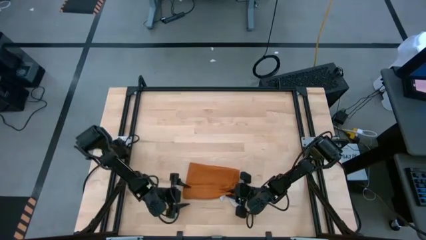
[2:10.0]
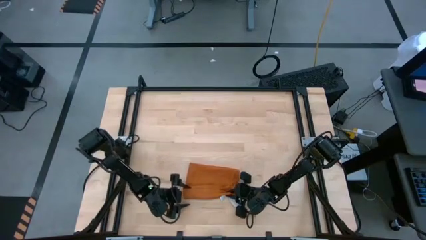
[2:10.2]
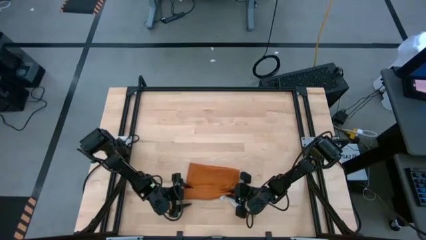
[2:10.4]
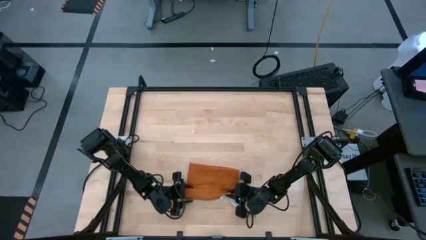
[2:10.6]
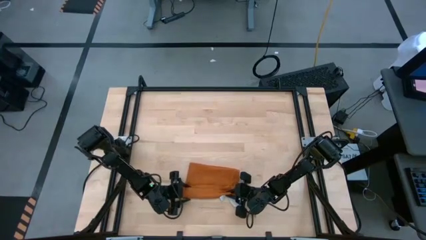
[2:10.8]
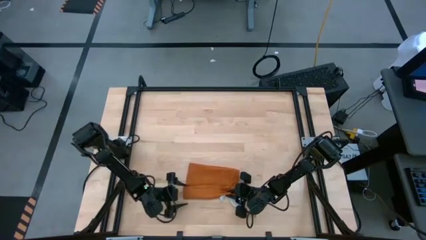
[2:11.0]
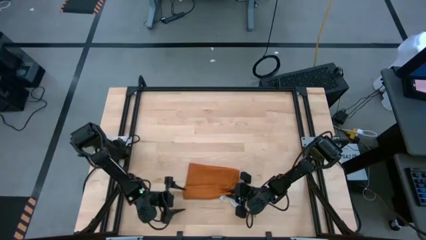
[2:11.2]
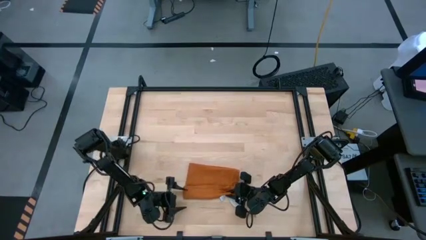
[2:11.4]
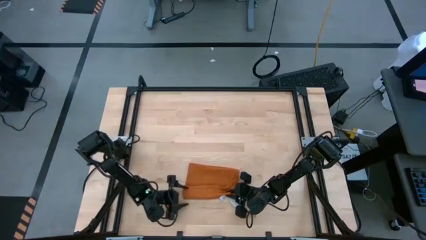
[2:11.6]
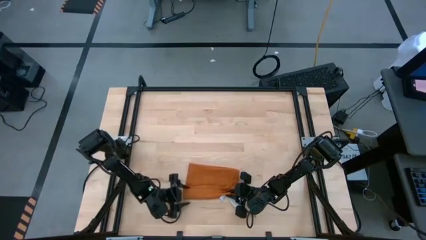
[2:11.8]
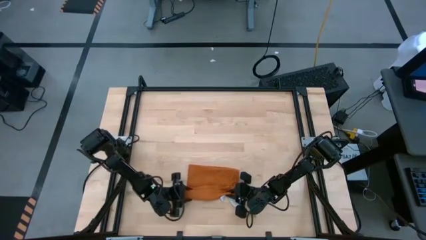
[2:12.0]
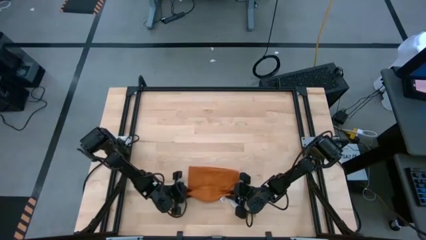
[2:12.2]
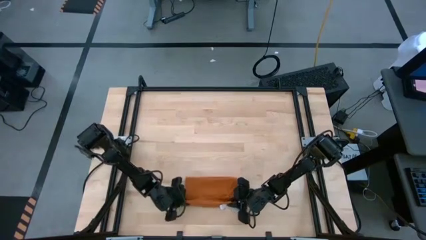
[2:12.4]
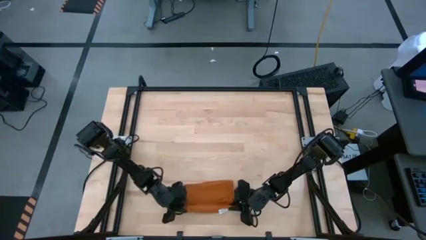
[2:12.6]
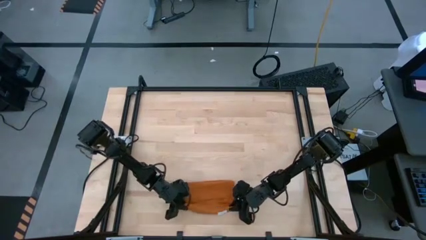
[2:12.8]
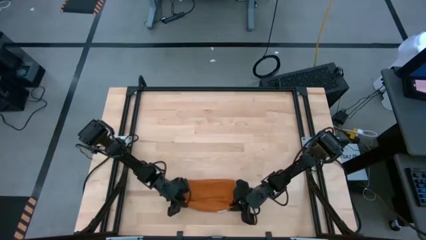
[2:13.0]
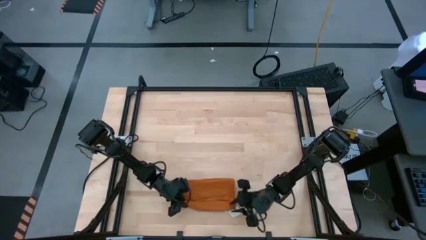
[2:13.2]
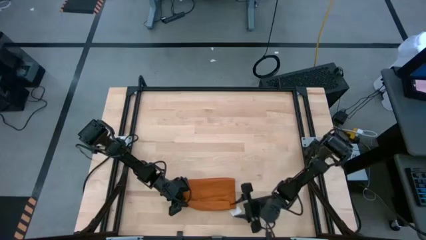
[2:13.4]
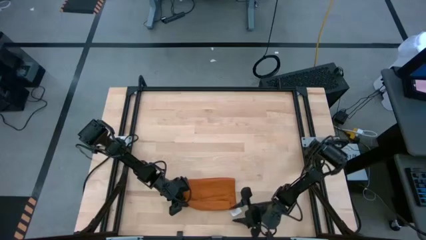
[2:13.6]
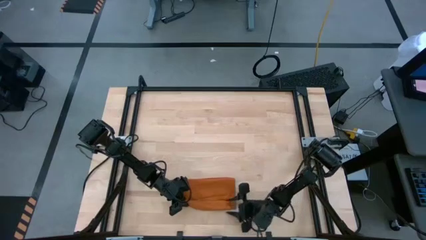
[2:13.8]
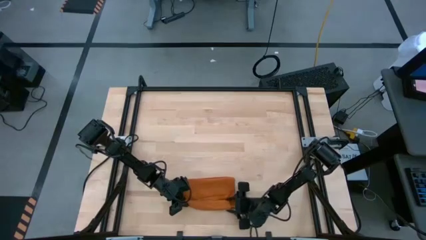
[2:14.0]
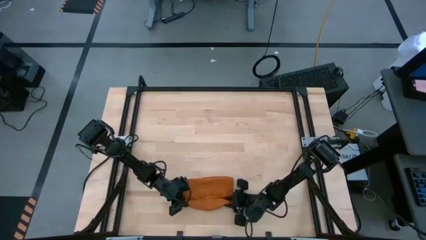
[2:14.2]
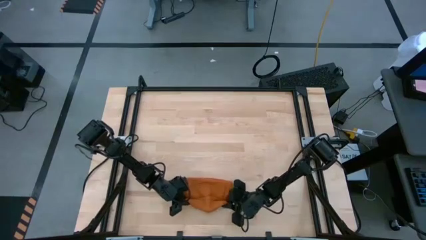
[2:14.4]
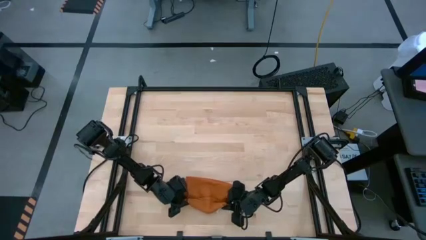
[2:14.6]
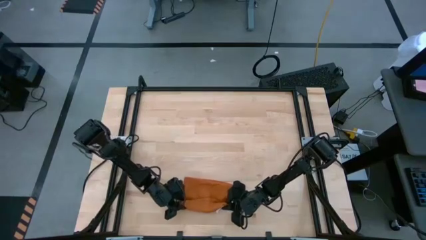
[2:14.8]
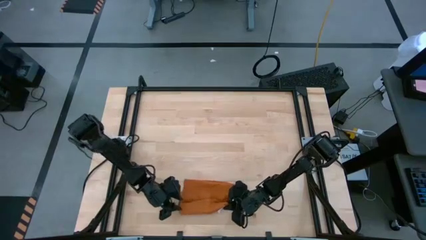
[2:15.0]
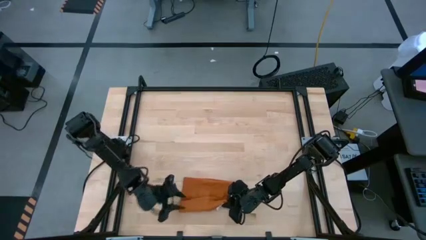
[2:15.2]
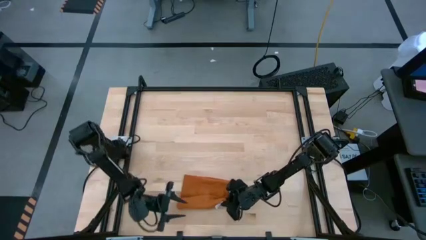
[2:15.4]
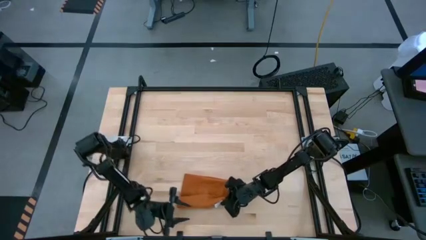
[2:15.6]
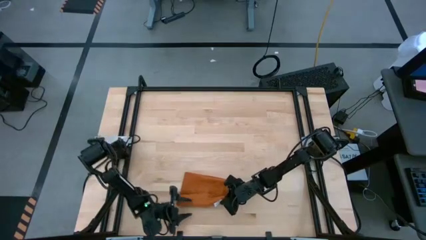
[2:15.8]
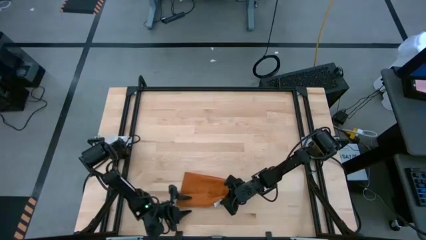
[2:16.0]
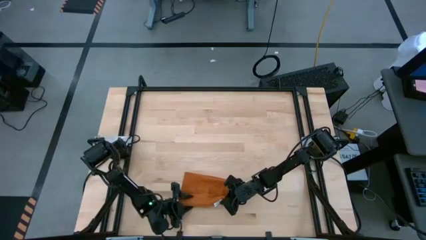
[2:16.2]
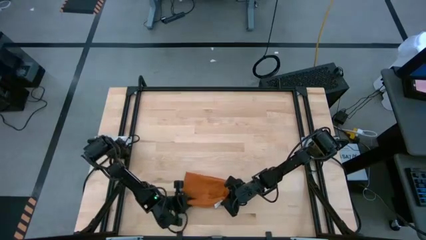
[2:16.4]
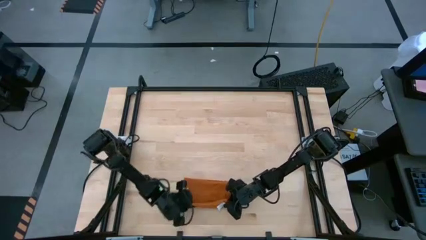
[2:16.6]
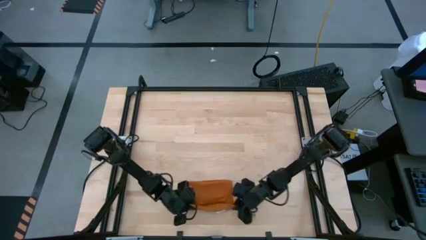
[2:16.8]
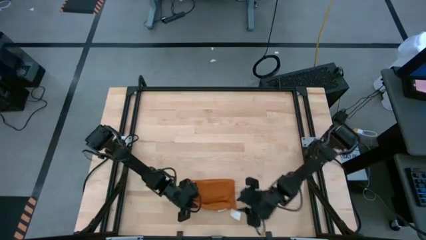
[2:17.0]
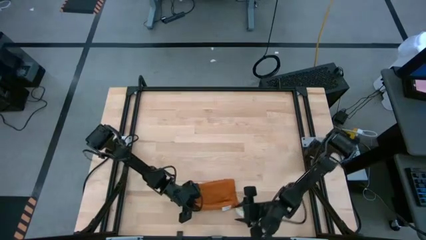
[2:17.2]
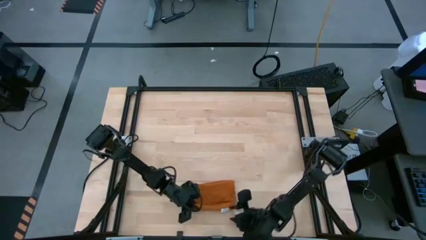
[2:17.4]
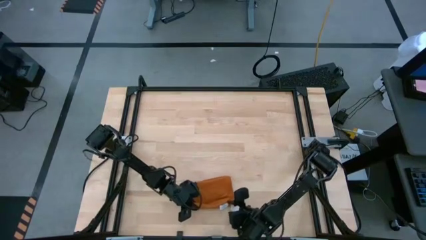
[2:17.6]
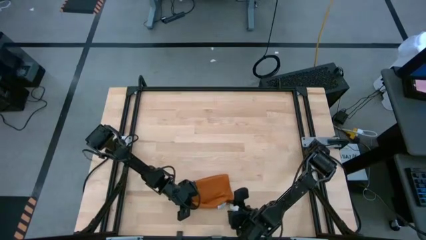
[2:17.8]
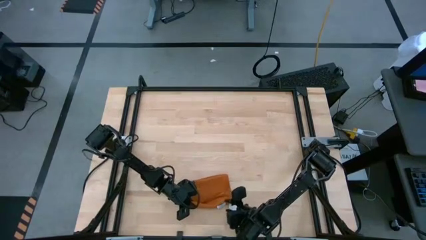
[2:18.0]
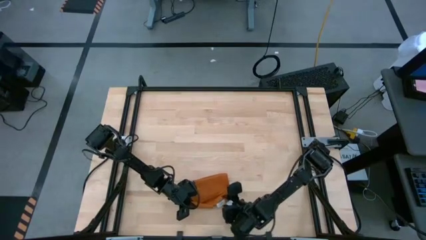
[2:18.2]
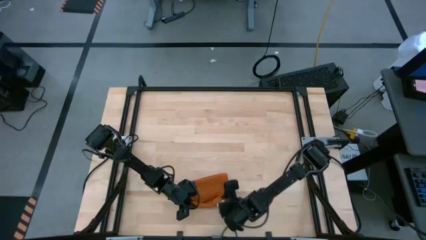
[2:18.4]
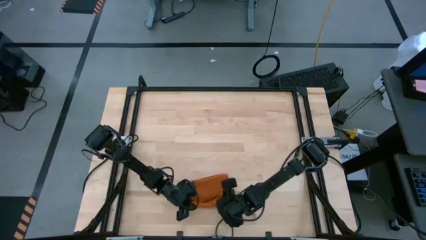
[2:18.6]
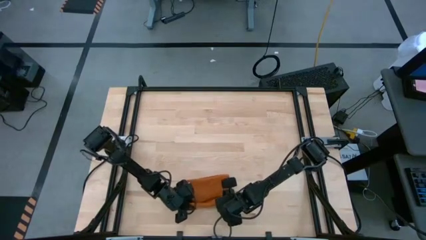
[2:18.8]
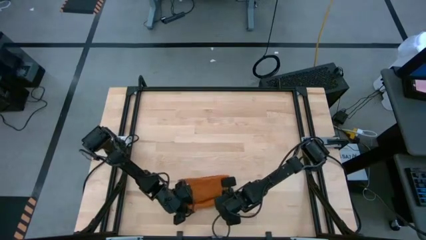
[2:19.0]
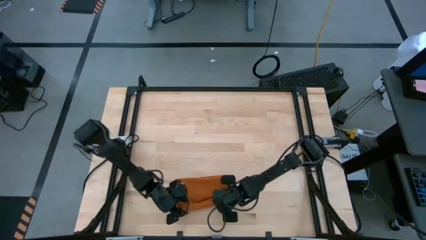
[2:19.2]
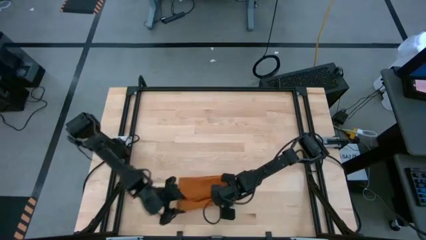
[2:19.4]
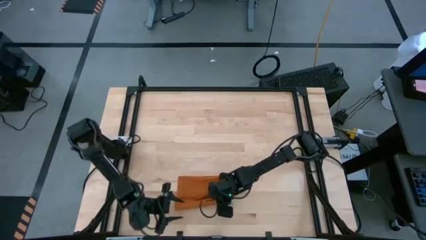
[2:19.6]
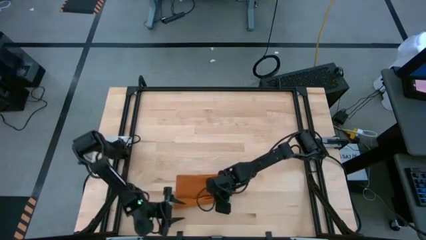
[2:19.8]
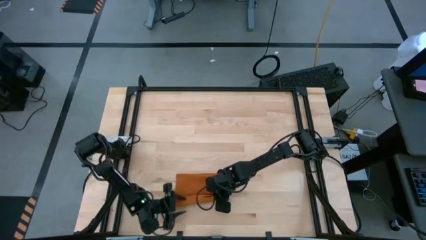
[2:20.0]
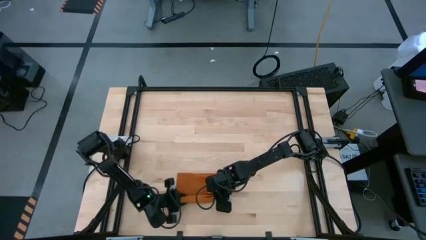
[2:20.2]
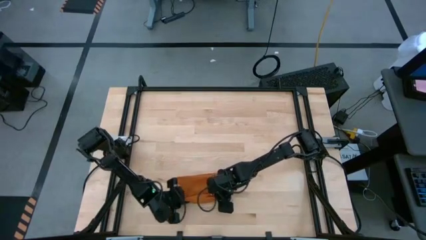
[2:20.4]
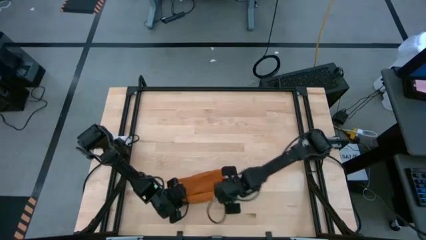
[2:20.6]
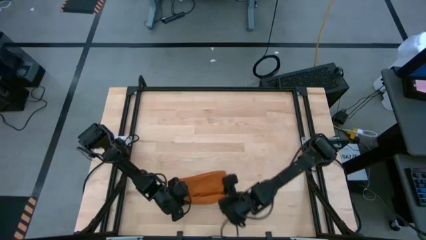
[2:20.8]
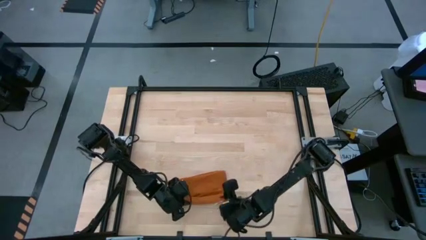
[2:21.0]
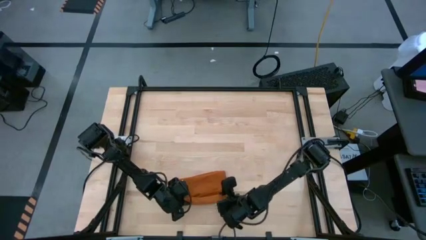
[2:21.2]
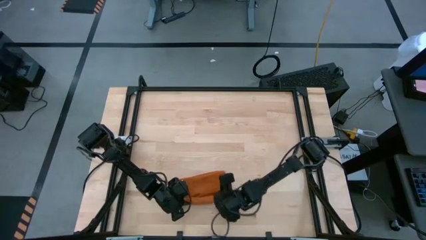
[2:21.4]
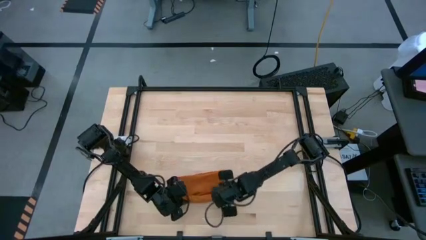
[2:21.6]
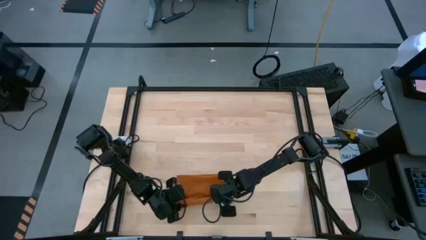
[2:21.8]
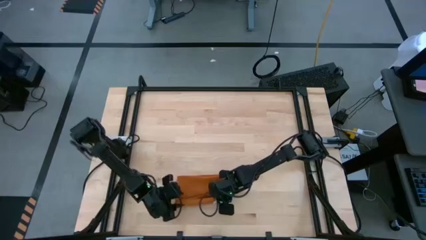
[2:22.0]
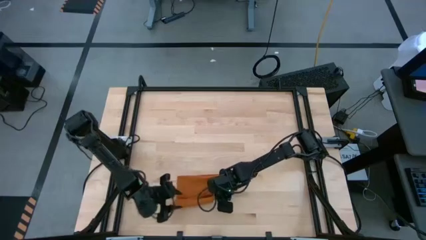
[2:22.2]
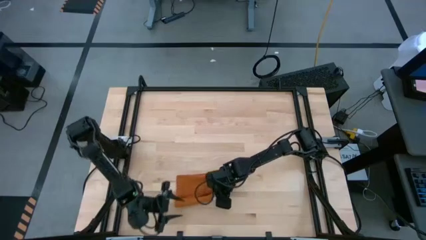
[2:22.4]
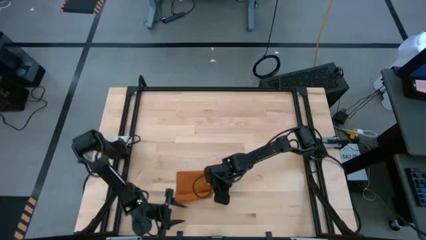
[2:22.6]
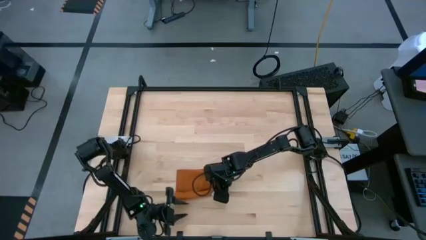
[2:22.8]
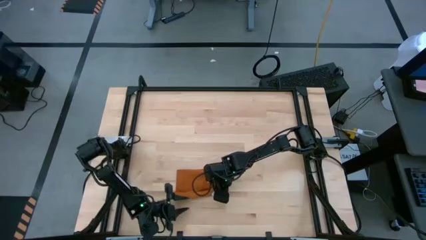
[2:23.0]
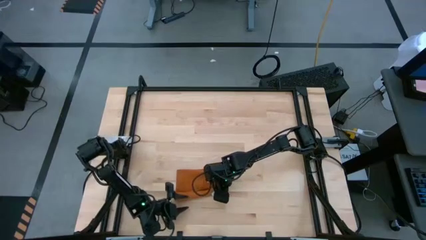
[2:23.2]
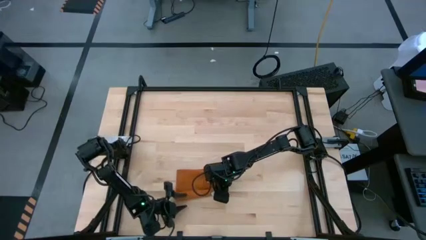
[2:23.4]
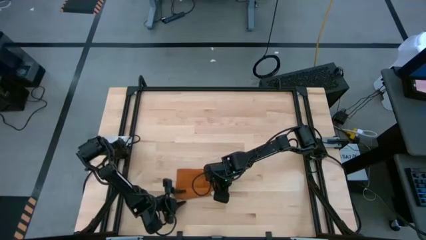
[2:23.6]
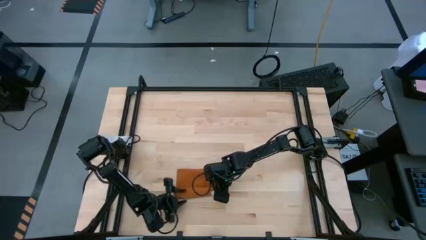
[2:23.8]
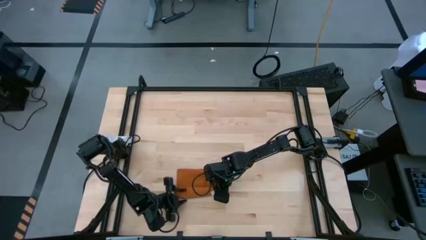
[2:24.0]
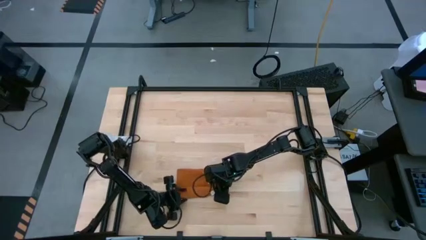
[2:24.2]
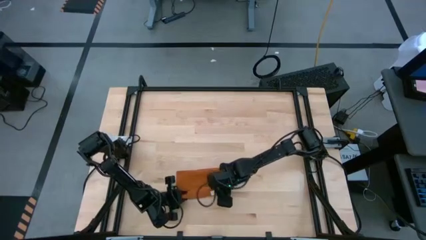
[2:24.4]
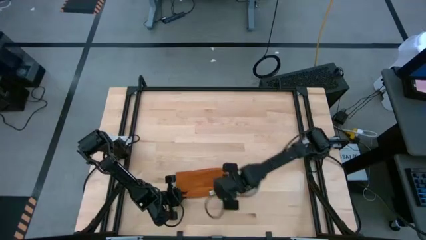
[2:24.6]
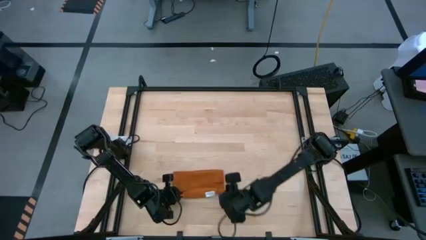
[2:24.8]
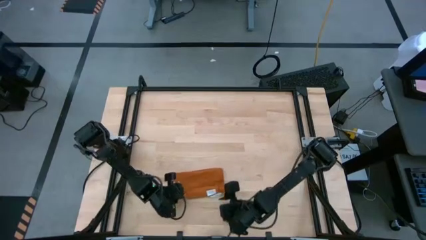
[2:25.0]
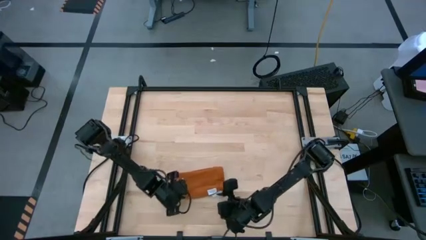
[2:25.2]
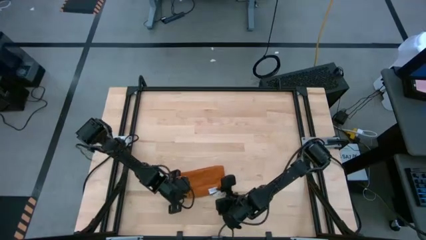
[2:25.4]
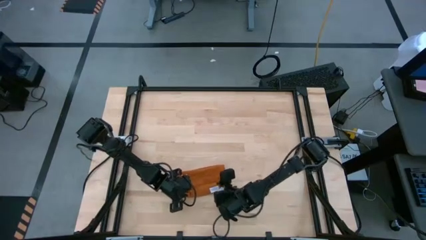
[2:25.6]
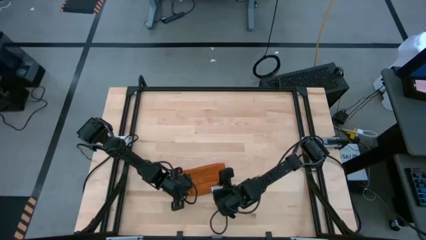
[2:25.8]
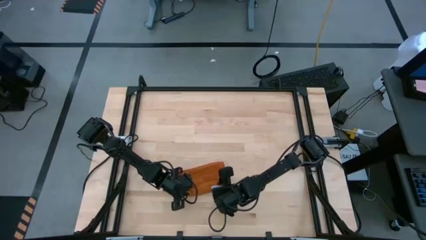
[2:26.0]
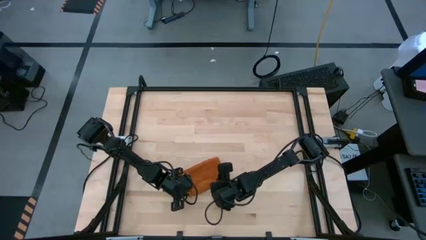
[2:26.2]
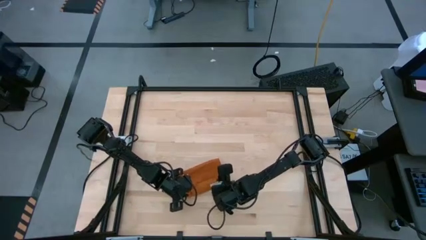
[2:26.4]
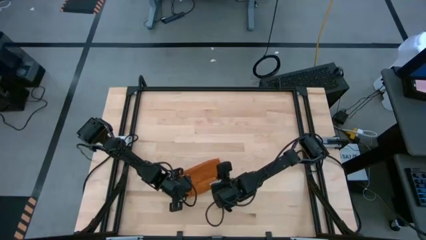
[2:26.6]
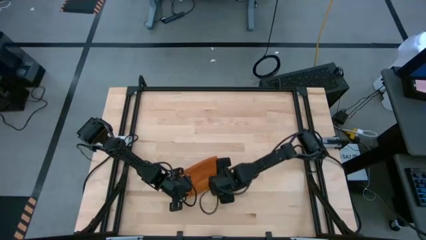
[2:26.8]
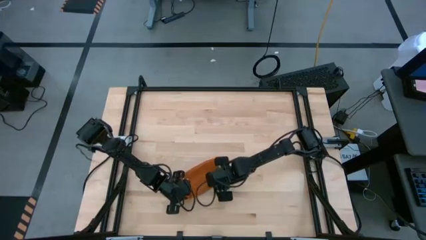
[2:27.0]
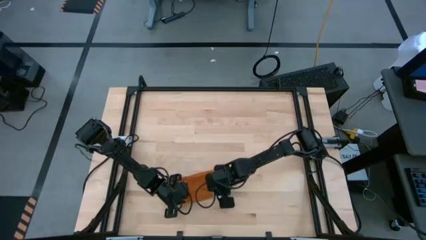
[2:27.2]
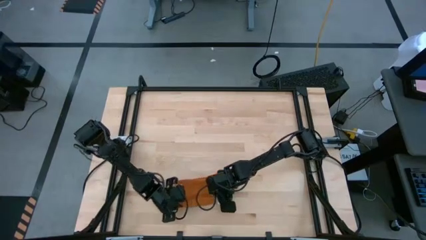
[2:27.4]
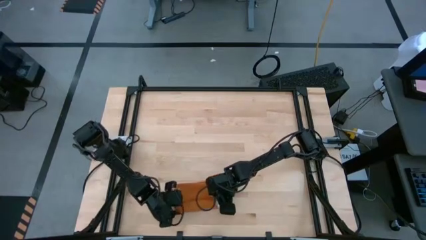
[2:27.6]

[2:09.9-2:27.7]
Task: Roll towel
Roll the brown towel
